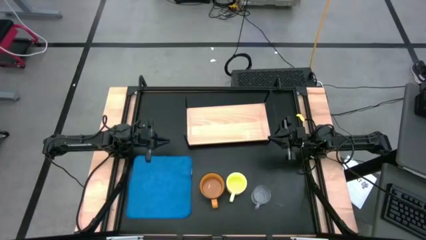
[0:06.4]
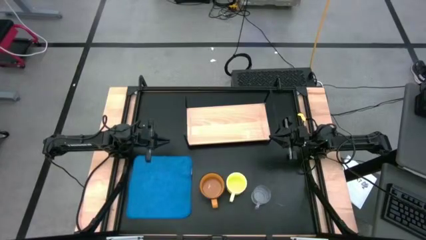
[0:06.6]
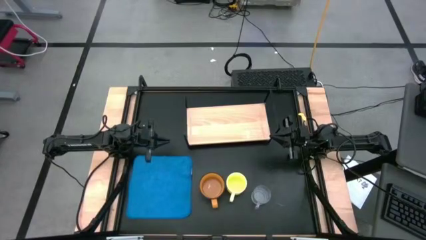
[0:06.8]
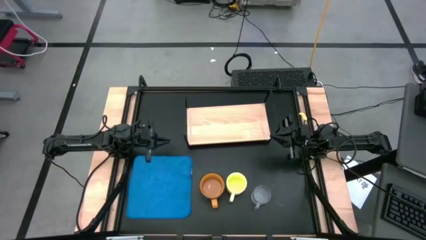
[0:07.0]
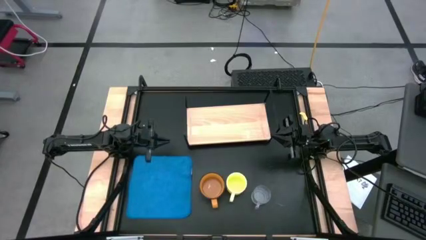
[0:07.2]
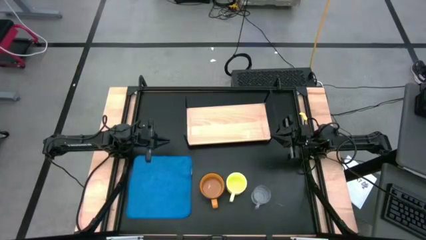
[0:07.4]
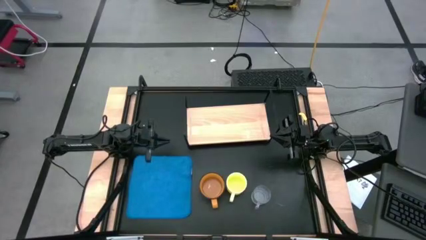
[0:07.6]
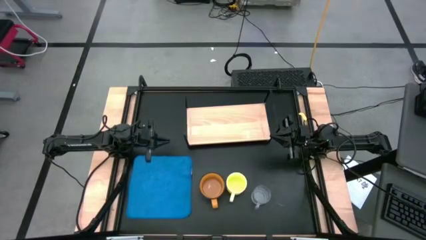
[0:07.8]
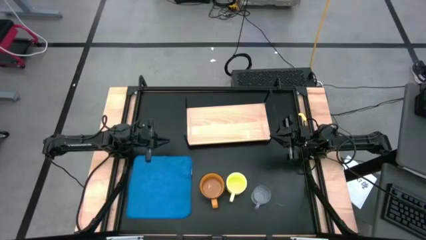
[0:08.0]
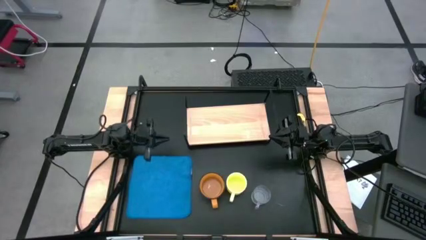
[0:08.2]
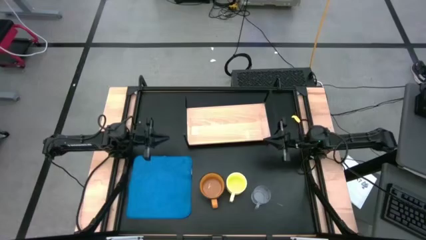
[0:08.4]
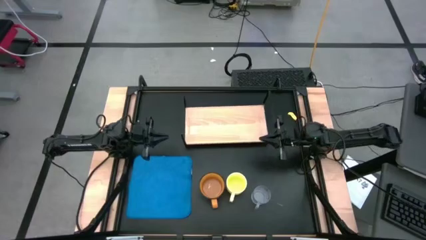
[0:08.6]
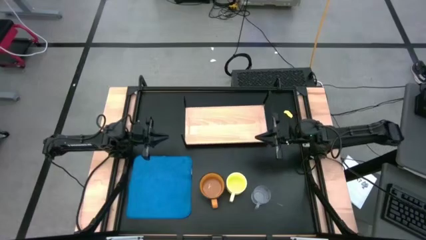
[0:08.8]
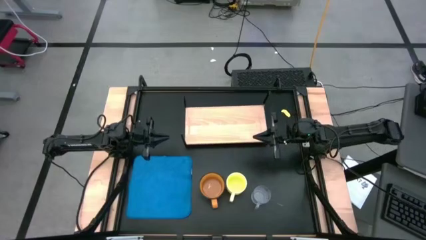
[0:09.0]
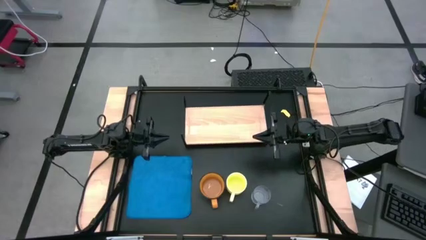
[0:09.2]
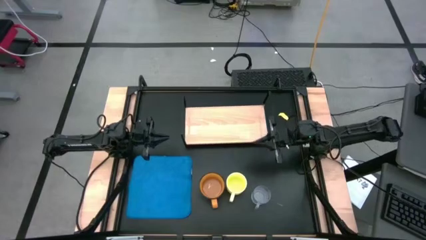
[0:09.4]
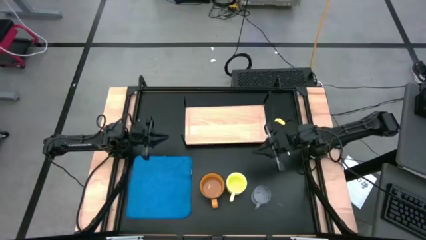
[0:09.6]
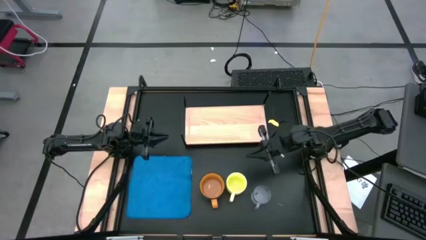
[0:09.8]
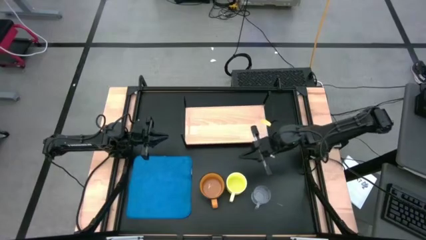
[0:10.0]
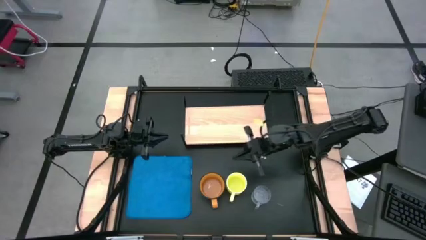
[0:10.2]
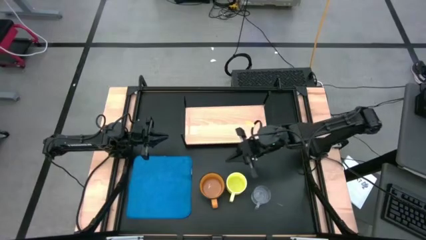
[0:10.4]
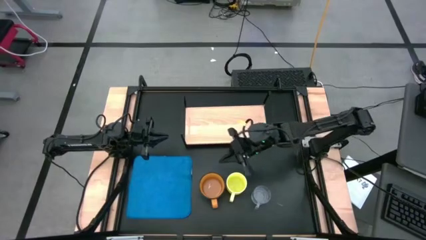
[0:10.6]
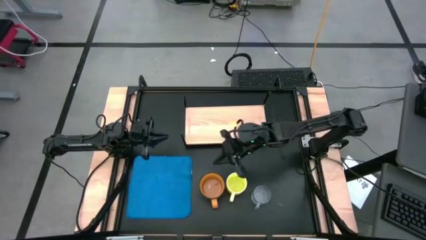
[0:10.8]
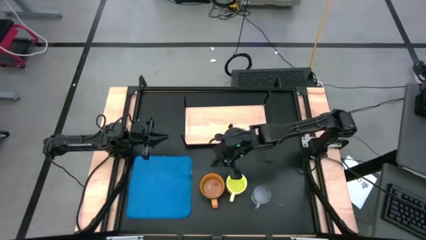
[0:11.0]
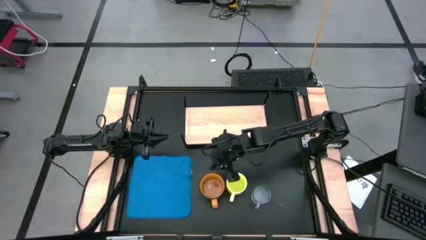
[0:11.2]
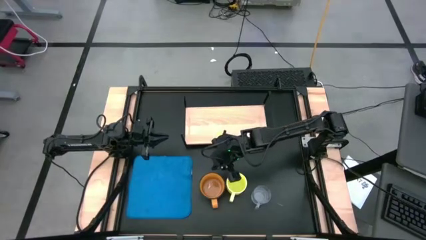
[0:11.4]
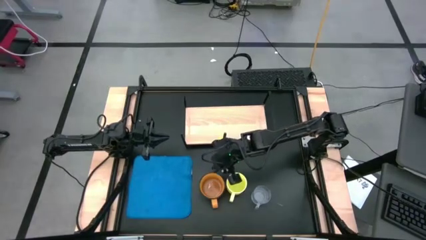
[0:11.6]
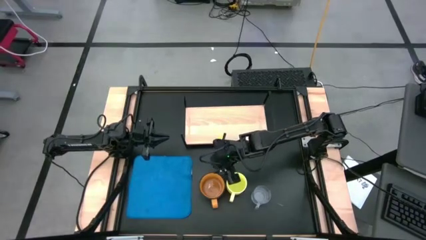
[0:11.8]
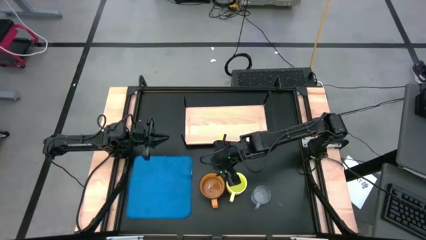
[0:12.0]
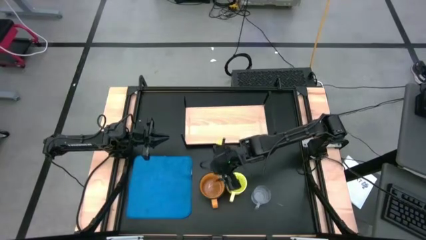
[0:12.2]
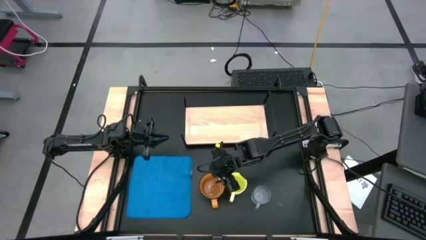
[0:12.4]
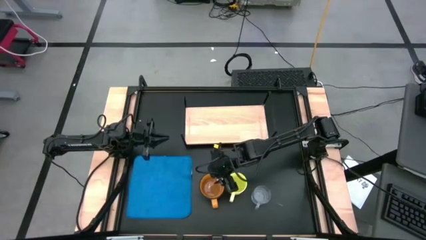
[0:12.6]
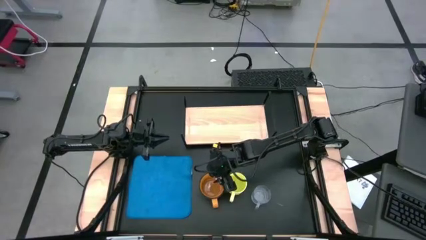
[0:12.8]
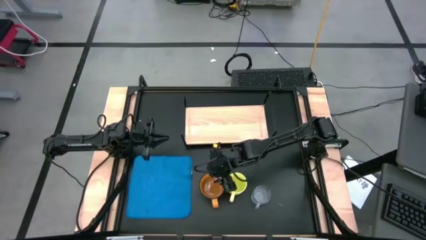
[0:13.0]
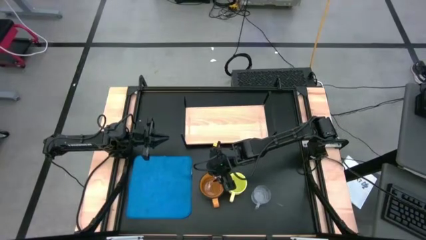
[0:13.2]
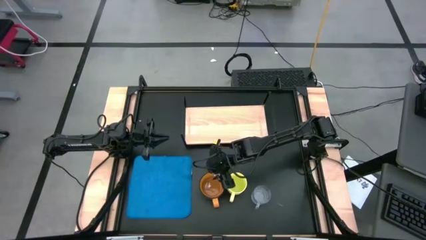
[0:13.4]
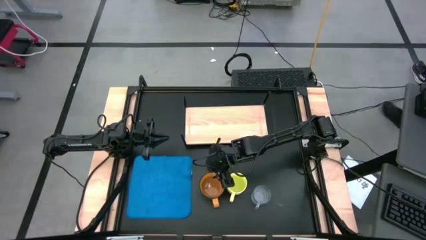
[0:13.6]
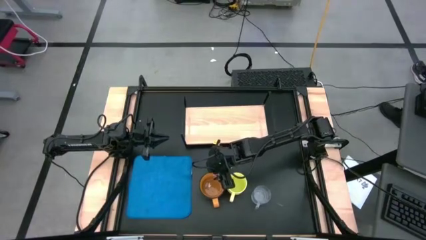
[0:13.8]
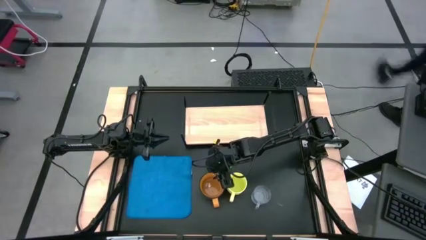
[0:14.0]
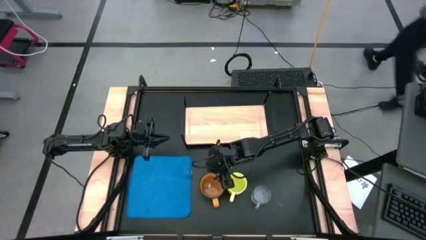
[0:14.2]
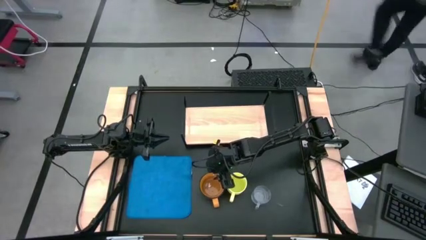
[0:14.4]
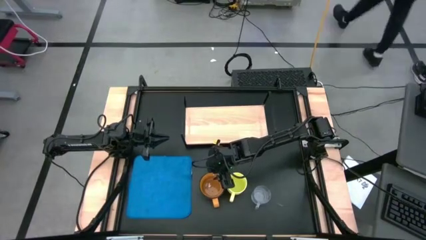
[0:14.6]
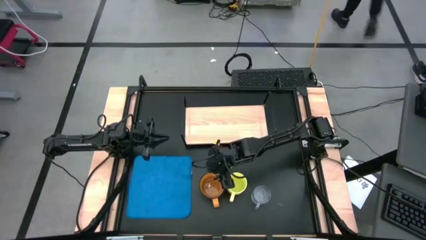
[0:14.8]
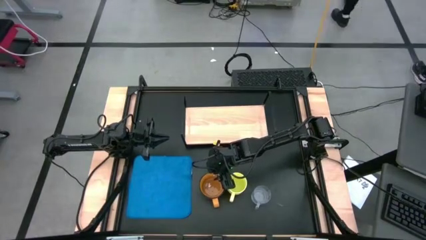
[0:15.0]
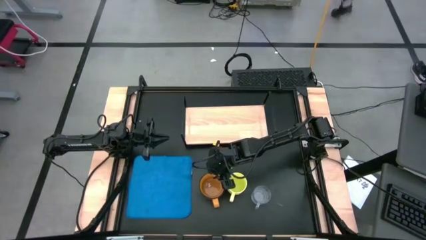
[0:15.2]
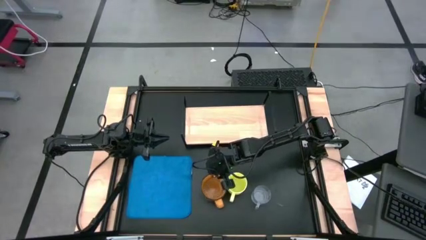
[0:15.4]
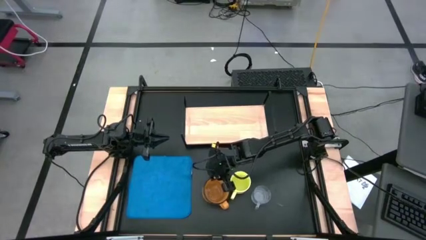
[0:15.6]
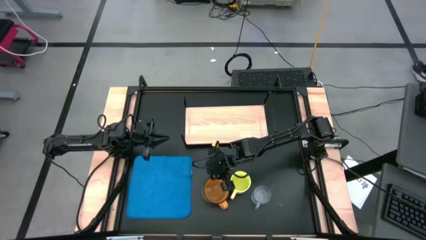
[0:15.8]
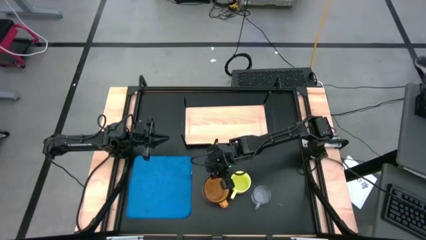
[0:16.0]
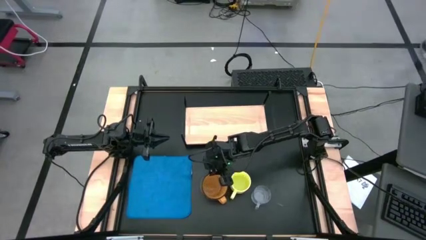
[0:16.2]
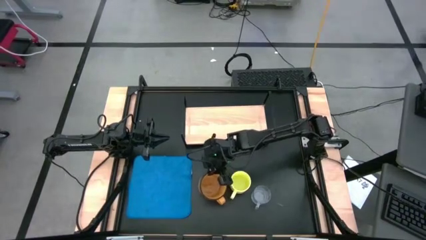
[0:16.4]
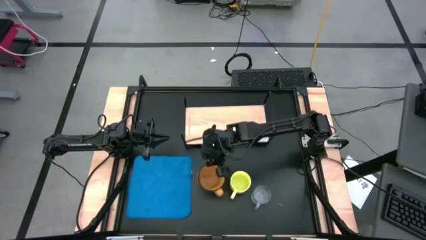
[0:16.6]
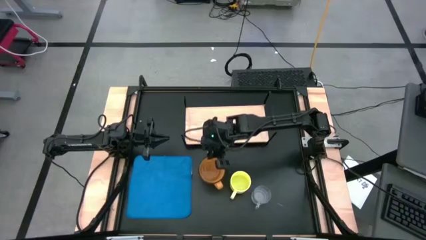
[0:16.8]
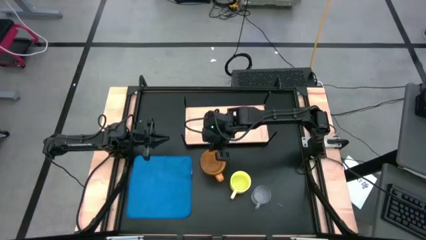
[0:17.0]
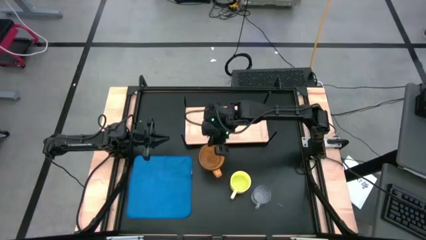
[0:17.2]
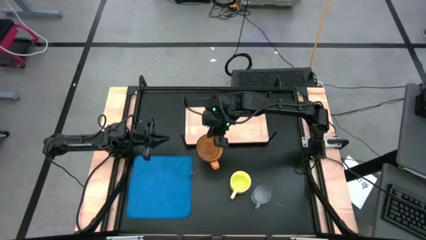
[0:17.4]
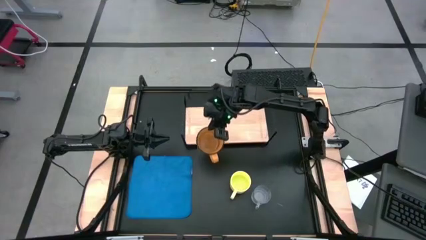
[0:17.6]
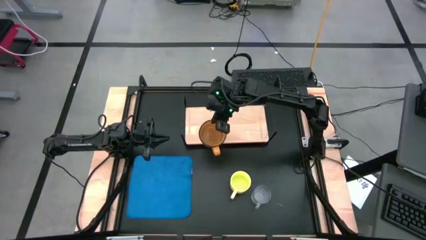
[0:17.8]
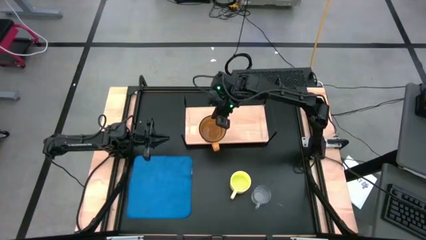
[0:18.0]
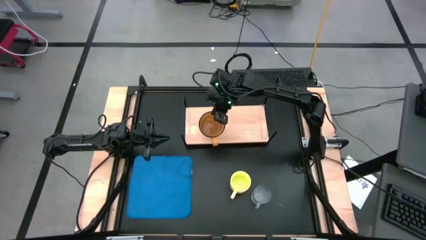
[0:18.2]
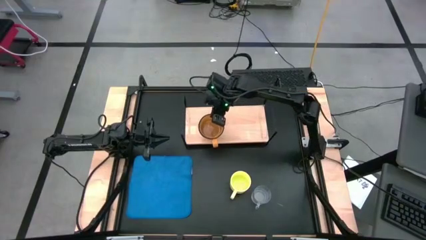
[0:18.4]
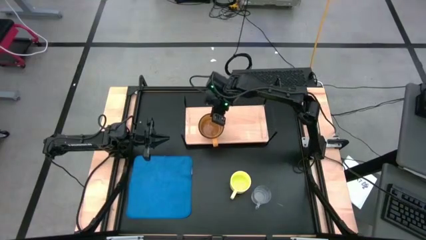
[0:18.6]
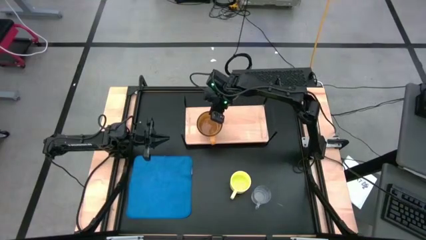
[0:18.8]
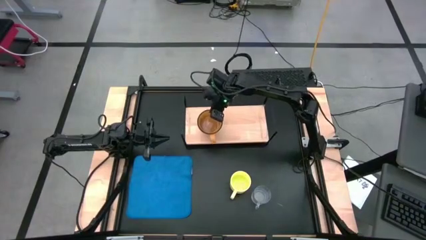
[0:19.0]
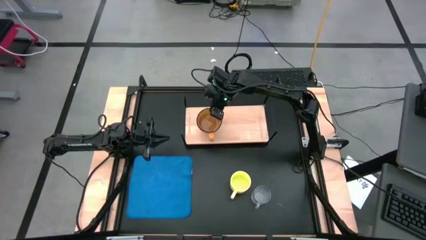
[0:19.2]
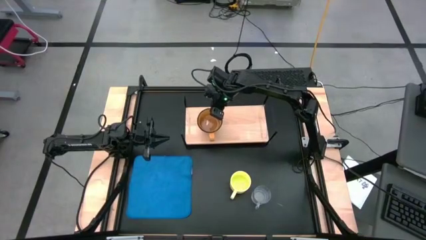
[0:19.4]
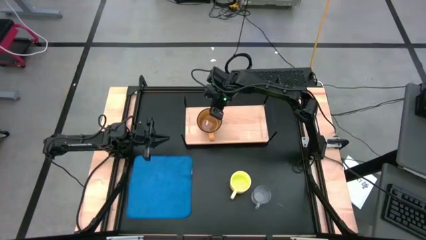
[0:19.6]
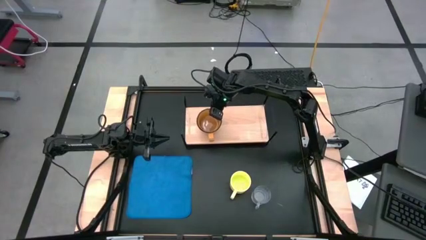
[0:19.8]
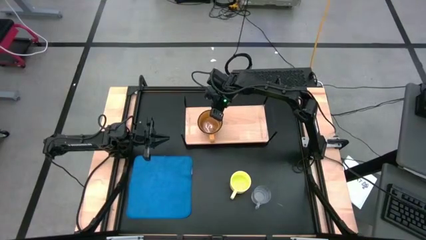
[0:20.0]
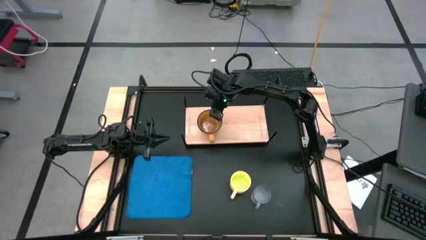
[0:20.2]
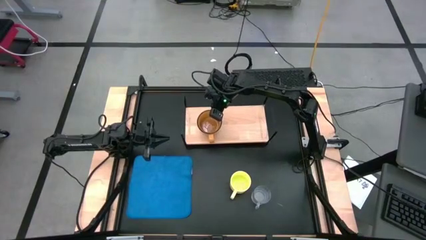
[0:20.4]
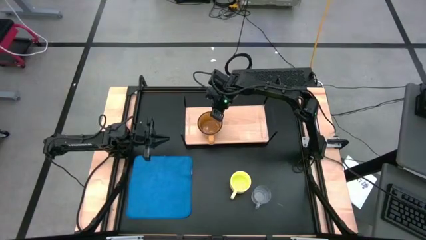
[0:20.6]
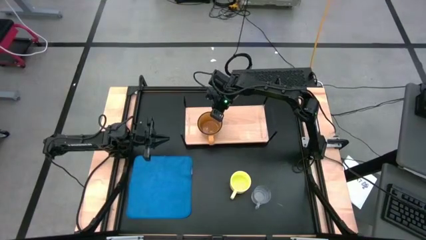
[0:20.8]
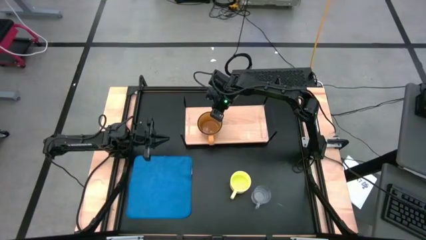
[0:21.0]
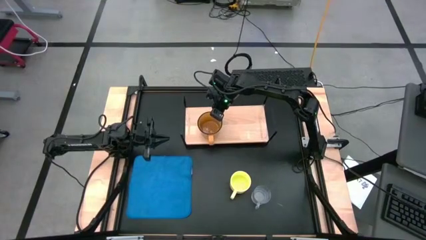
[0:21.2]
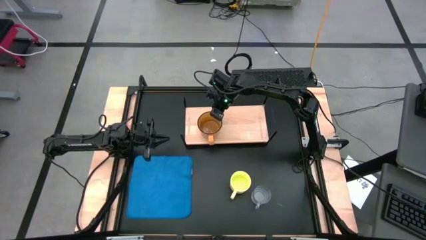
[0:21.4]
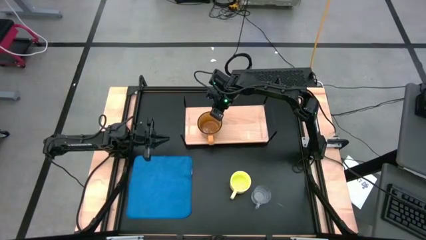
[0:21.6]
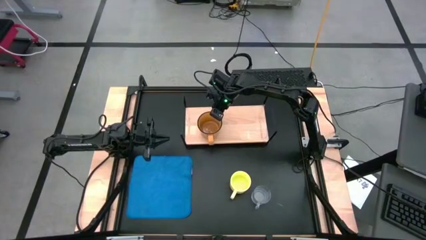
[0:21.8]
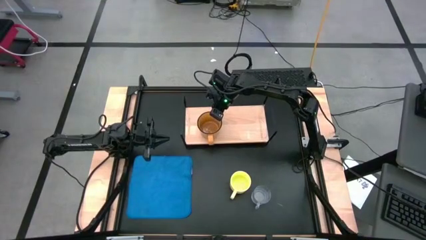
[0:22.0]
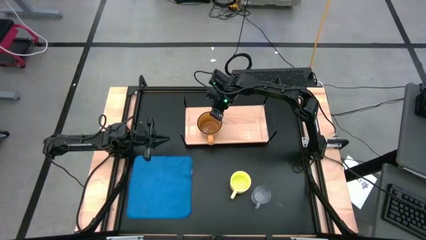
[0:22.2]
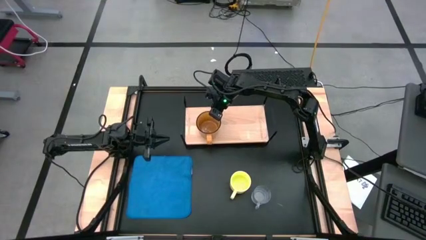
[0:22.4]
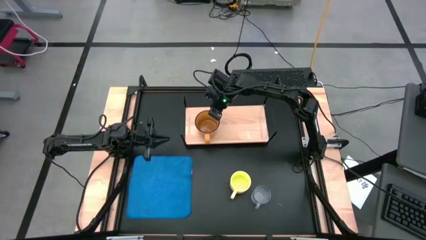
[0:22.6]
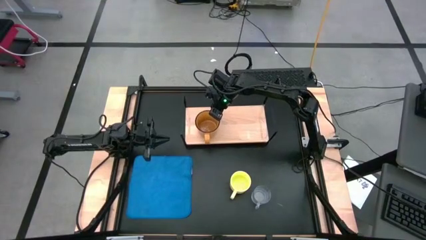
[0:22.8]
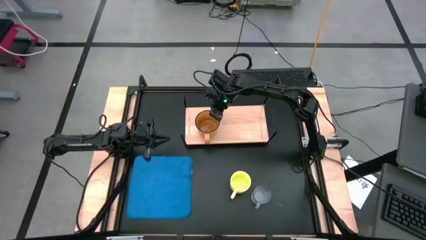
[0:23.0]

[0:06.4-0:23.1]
Task: Stack small to large cups/mugs on shelf
Put the orange mug on the shelf
